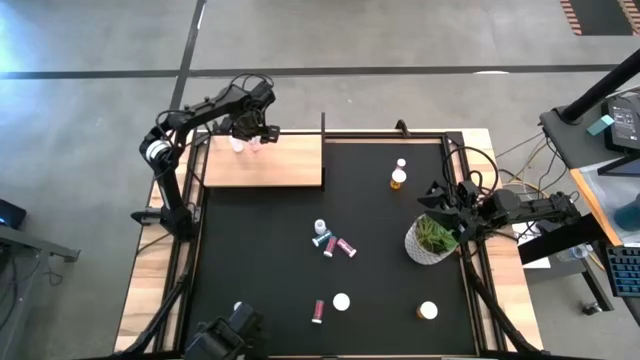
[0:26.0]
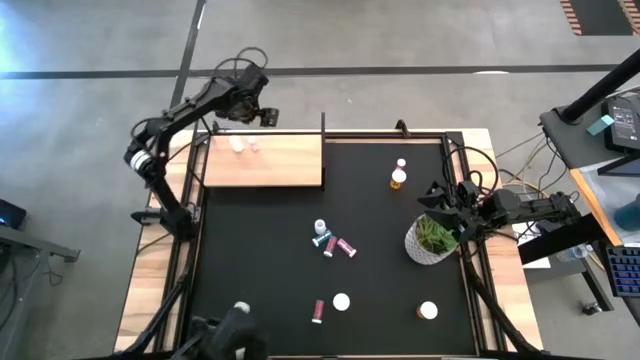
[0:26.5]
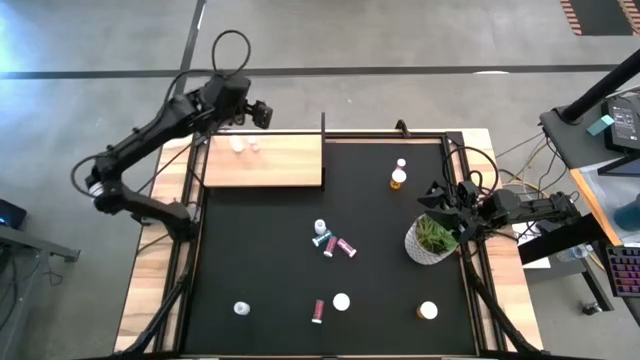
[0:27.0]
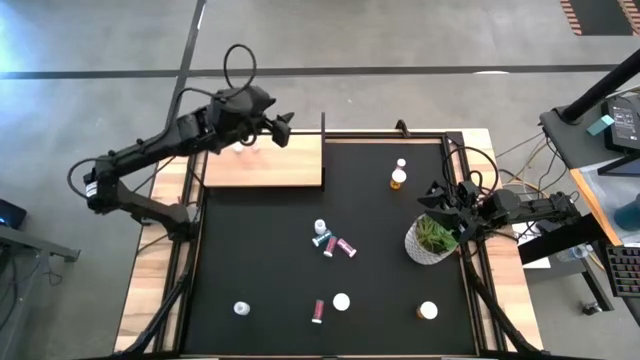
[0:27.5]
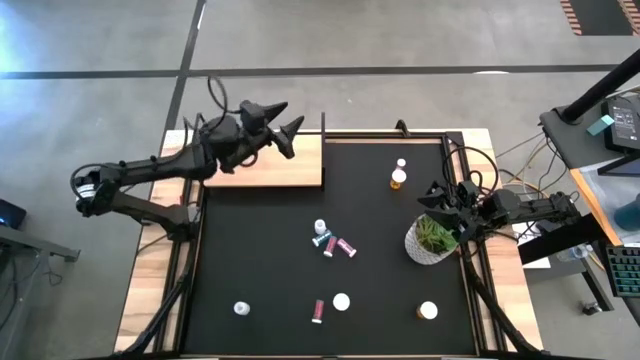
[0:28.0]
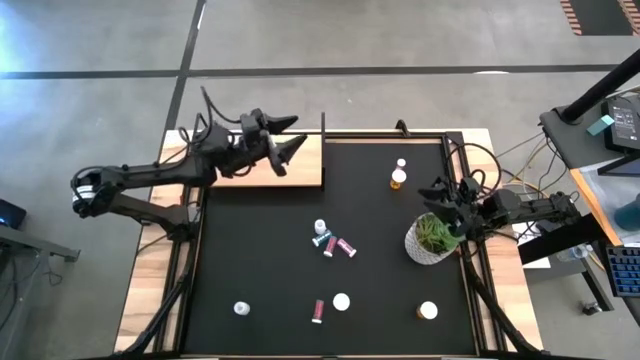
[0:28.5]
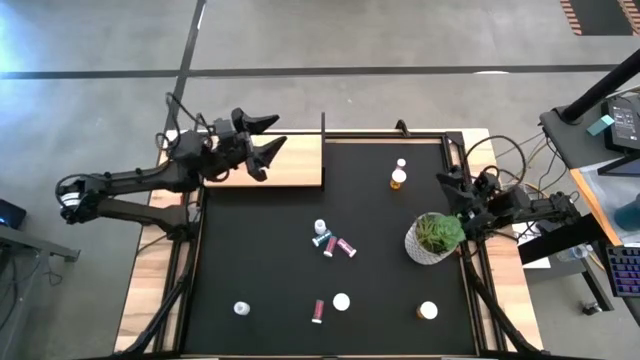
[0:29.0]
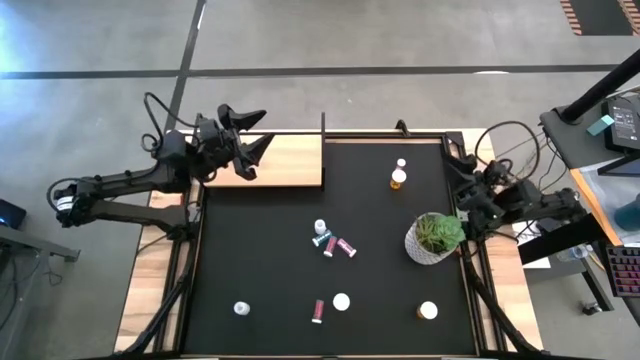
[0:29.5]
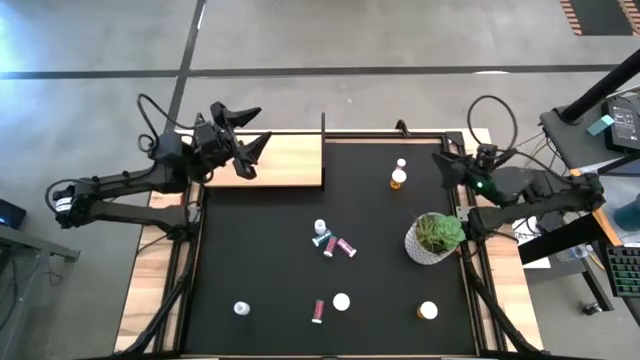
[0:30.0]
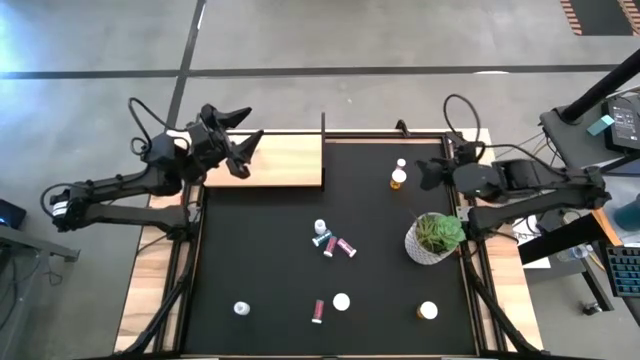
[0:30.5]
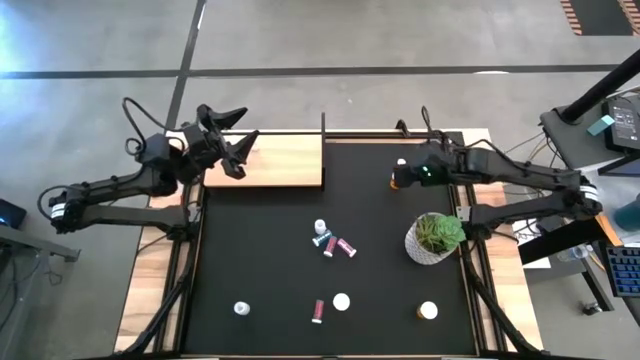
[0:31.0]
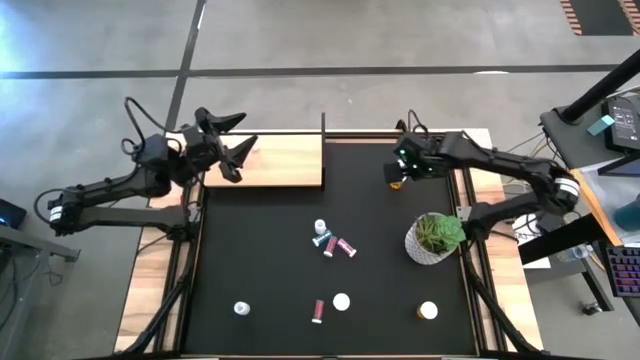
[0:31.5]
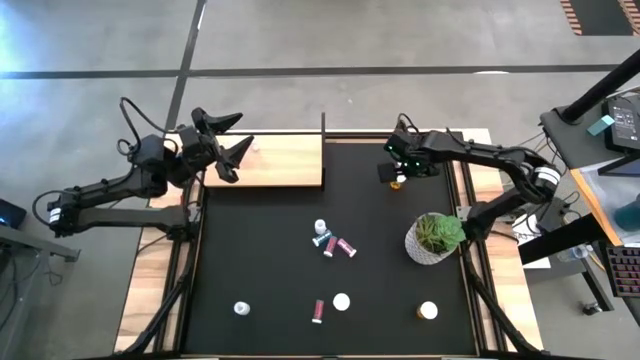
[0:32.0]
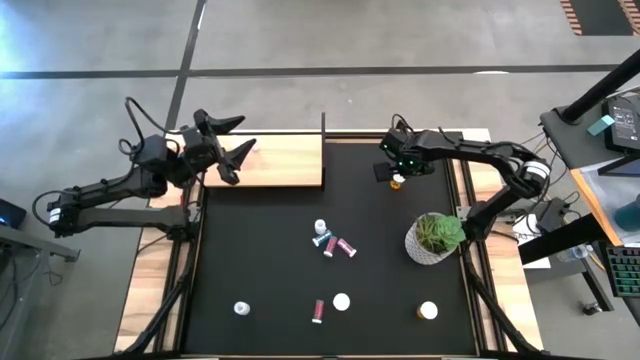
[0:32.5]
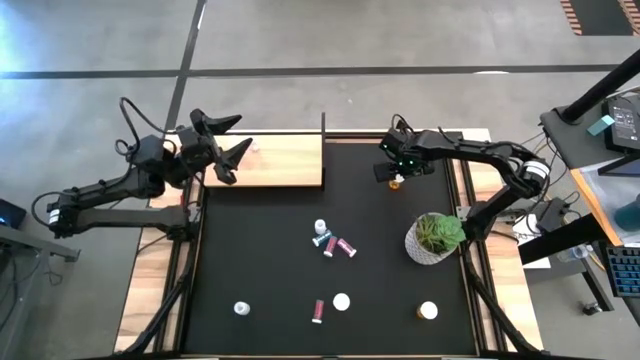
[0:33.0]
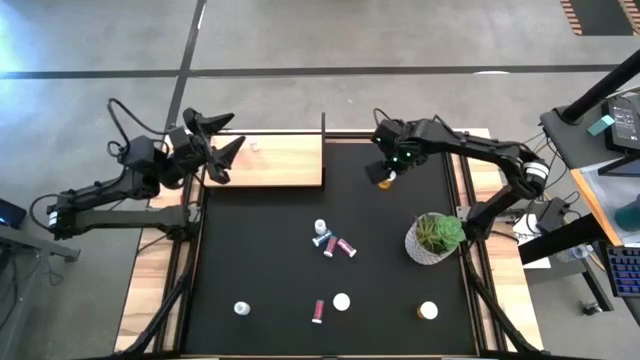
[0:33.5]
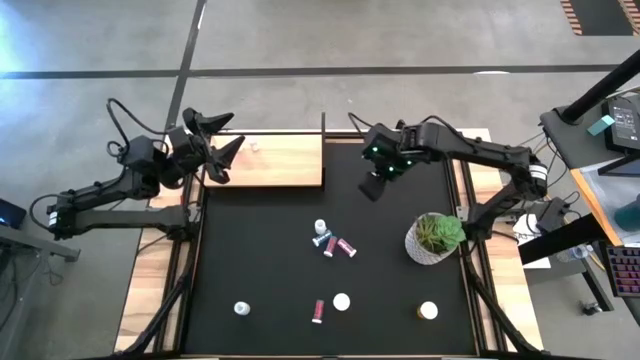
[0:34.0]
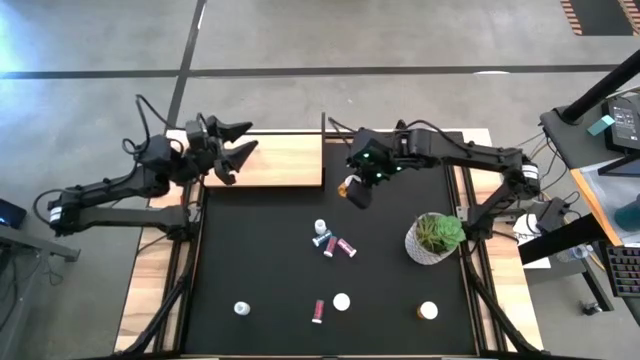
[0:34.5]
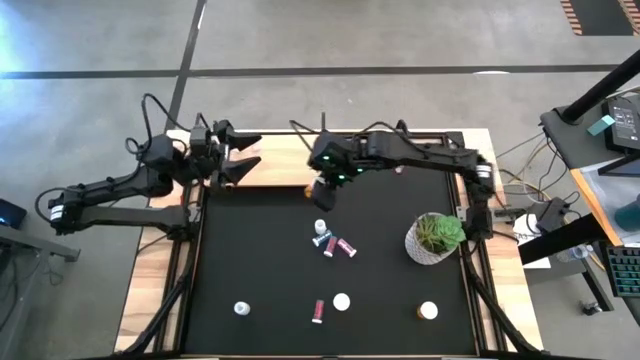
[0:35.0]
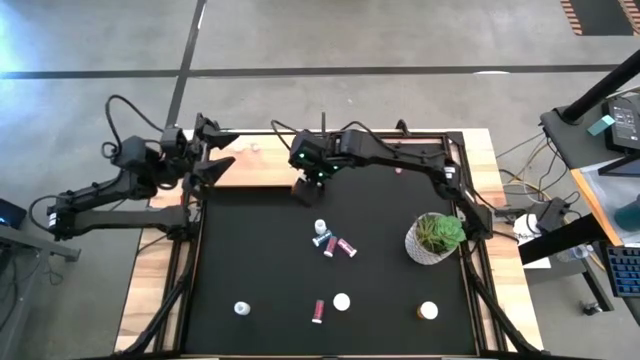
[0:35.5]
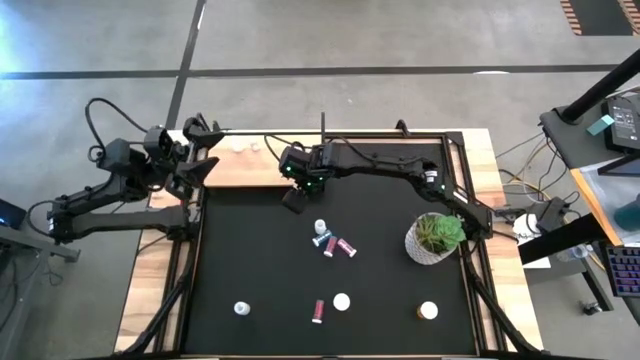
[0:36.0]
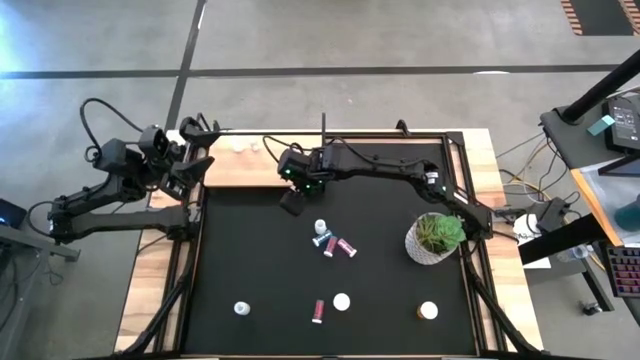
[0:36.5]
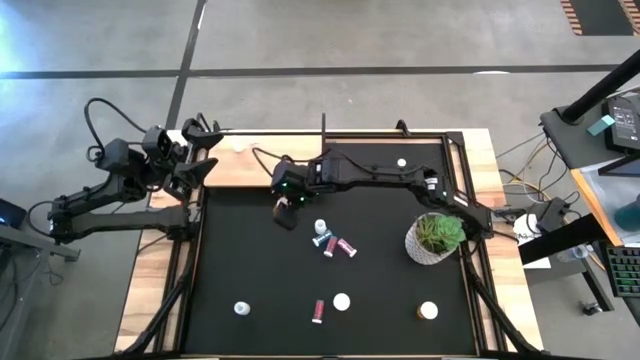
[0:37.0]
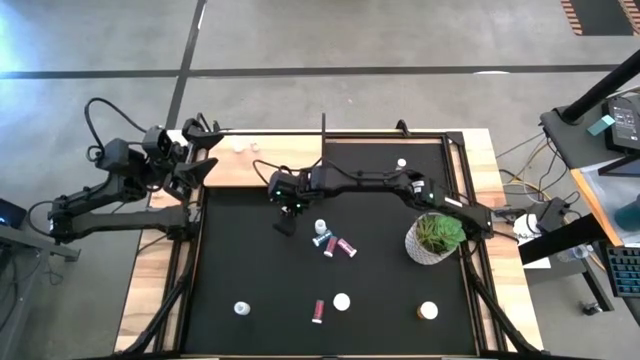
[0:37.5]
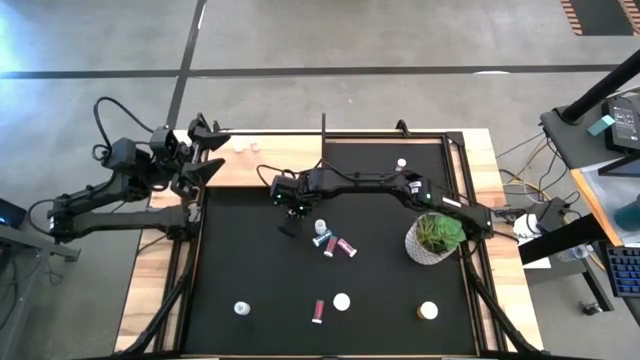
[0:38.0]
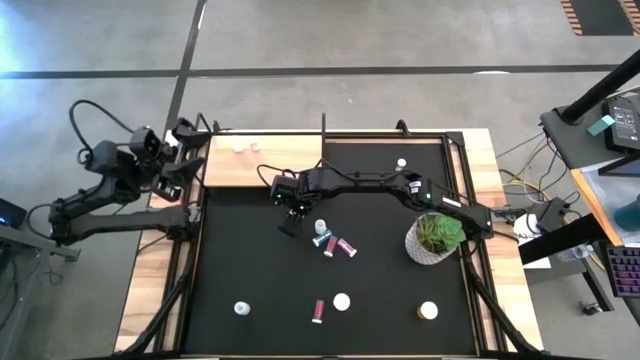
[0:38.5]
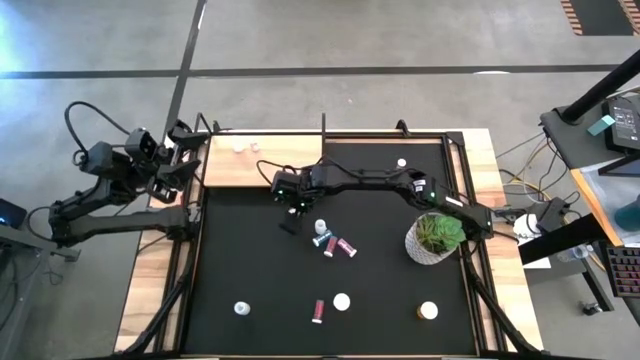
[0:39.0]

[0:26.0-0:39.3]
Task: Pick and place medicine bottles onto shelf by color
Move the top orange pill bottle to the middle left of the table

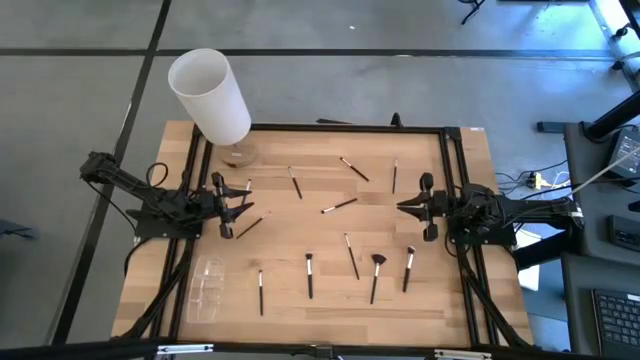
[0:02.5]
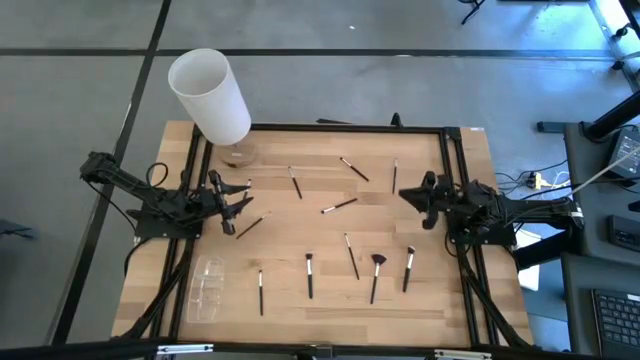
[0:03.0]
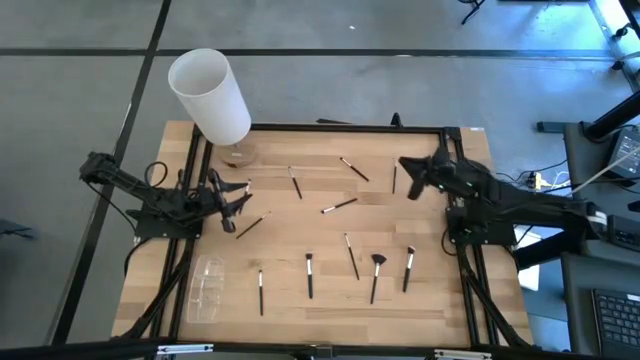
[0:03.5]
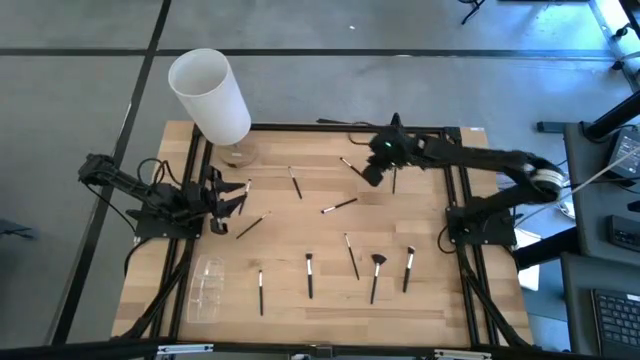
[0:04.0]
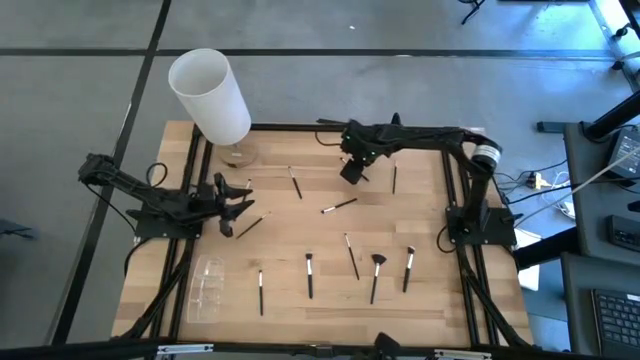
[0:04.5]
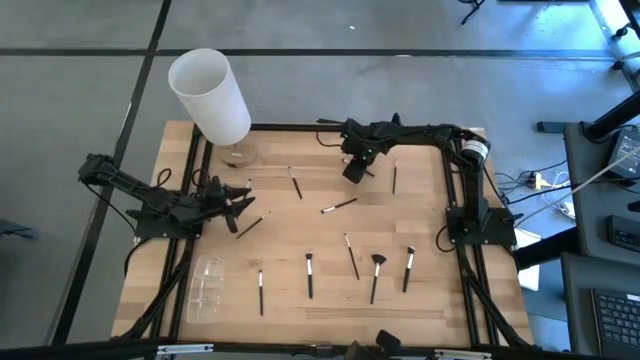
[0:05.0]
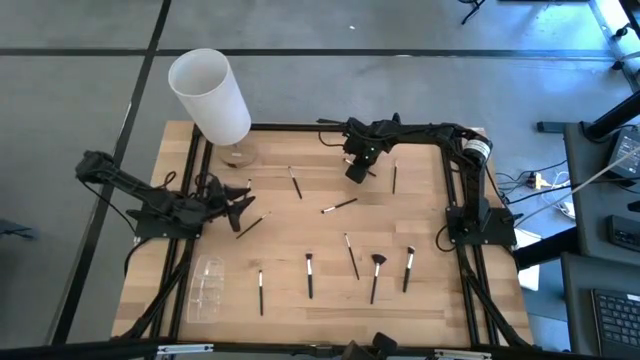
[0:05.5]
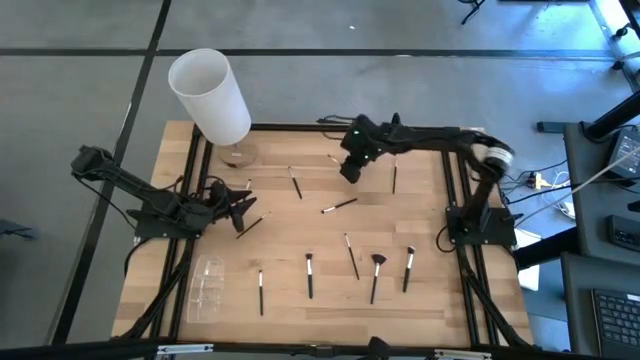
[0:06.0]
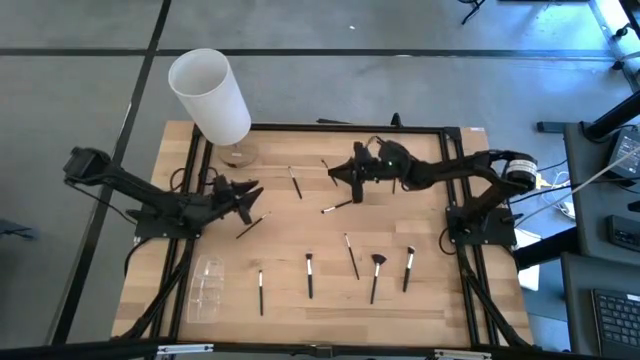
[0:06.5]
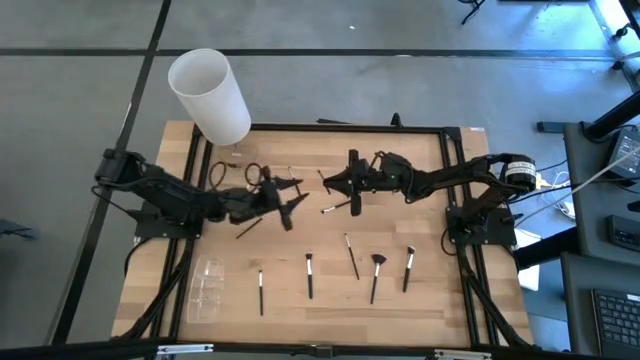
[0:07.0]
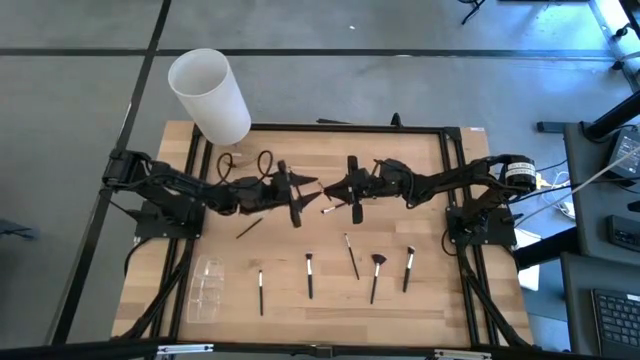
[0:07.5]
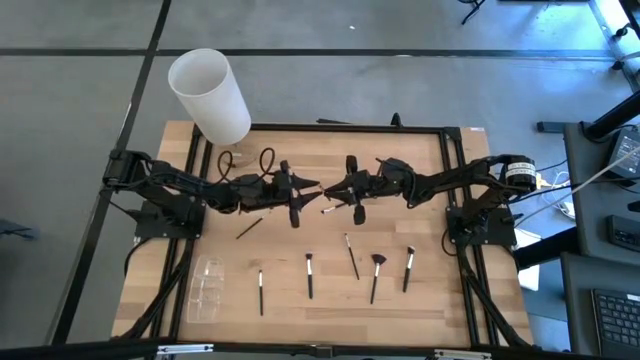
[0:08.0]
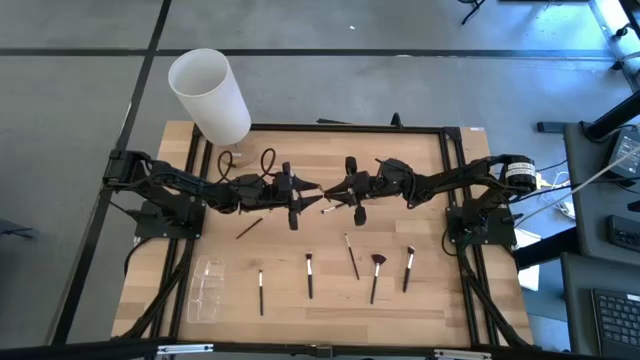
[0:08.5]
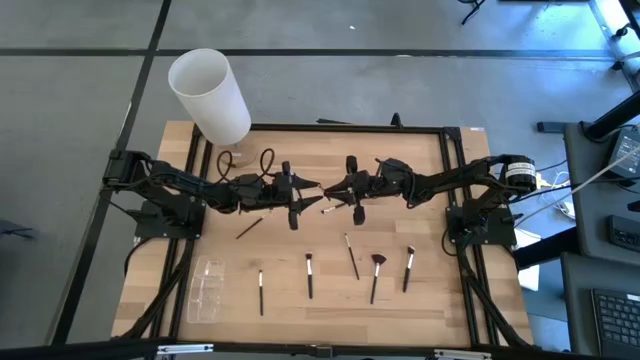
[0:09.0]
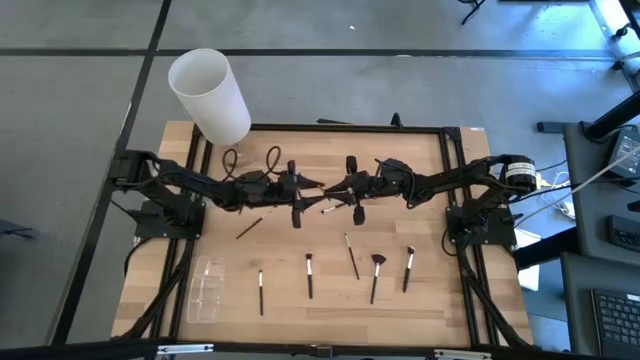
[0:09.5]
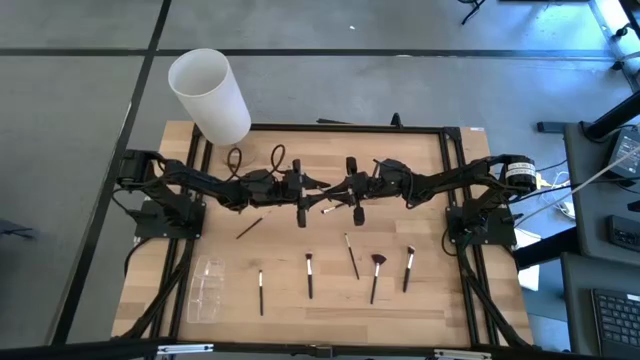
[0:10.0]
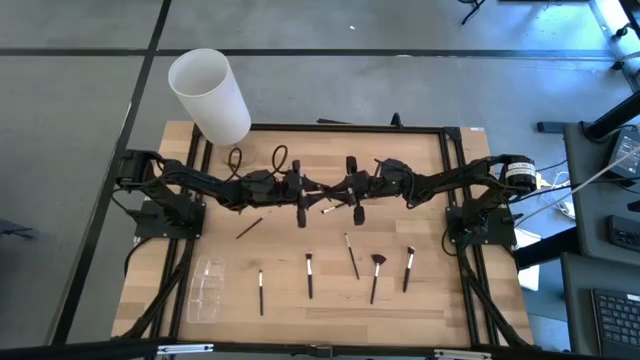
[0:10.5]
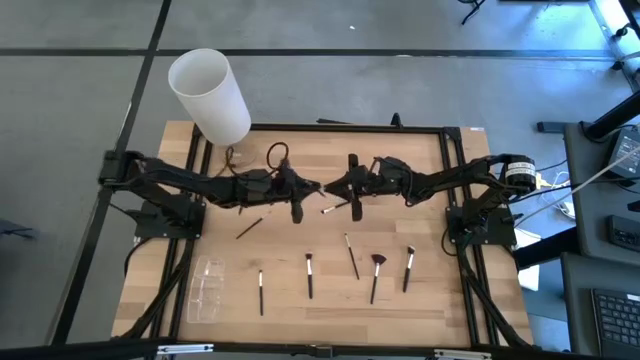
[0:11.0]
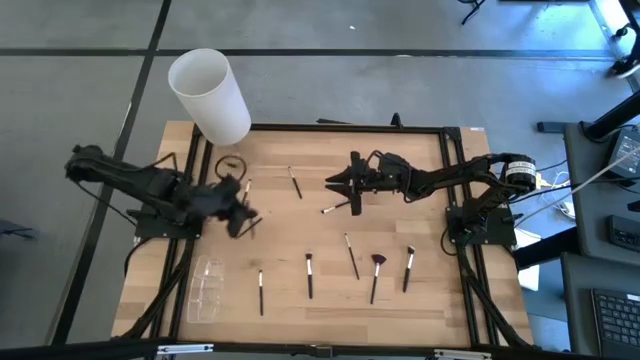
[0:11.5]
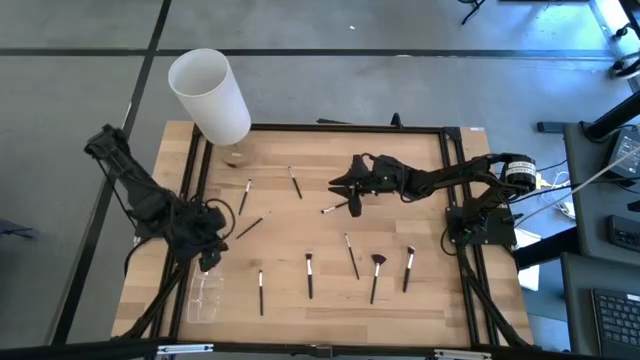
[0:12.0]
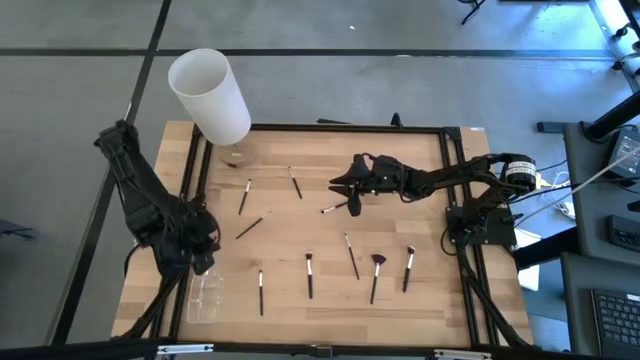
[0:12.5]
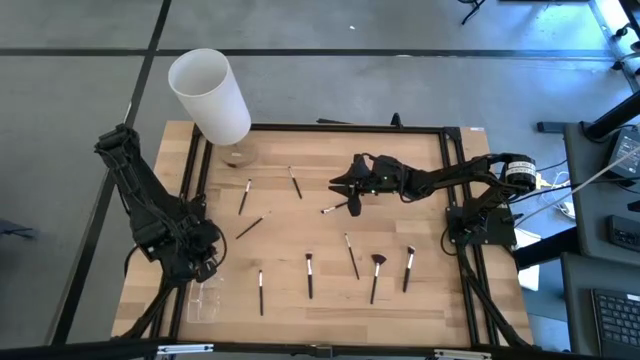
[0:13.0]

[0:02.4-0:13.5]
Task: Put items in baskets/containers
Put the eyeshadow brush into the transparent organizer
